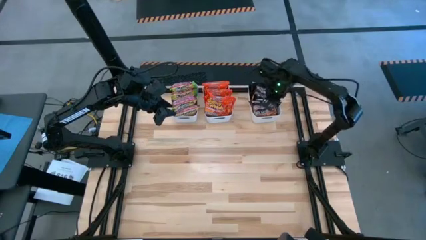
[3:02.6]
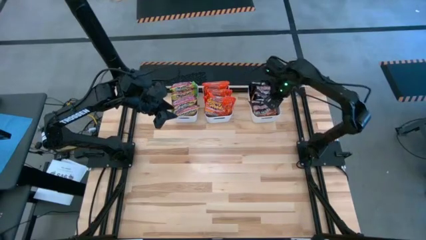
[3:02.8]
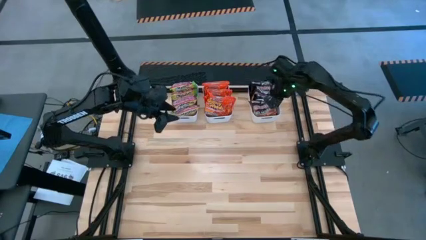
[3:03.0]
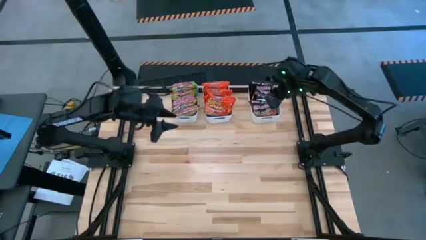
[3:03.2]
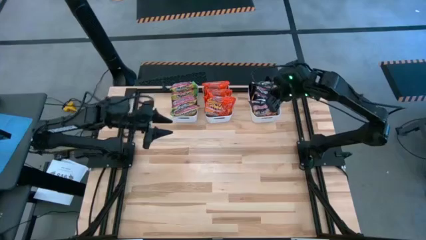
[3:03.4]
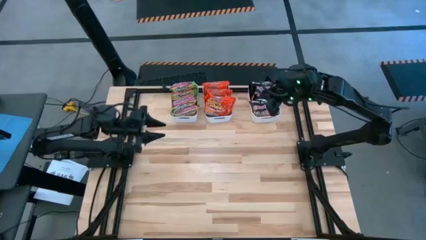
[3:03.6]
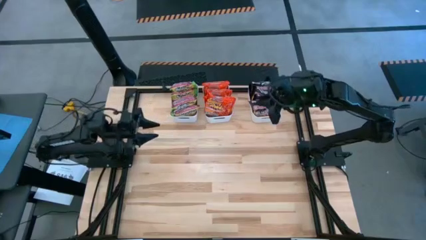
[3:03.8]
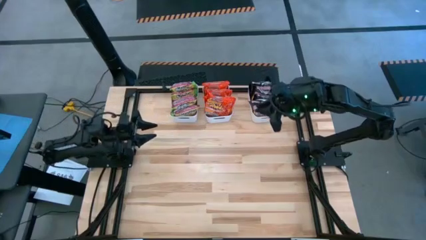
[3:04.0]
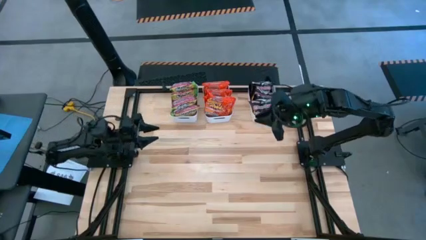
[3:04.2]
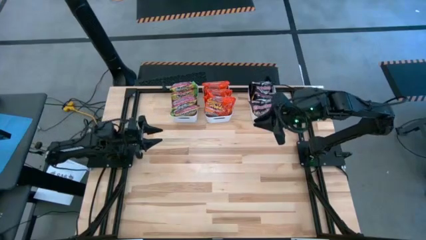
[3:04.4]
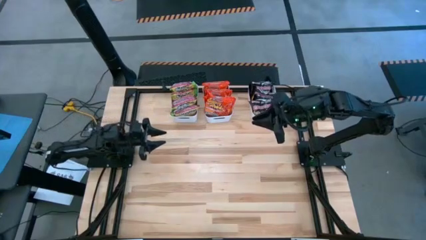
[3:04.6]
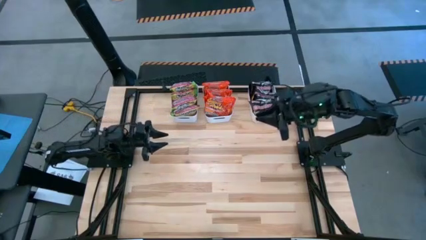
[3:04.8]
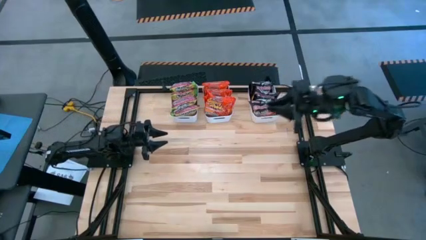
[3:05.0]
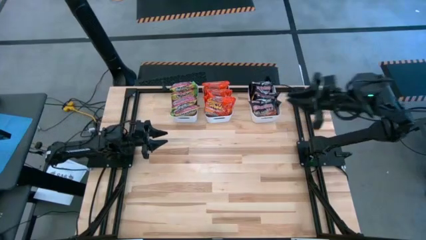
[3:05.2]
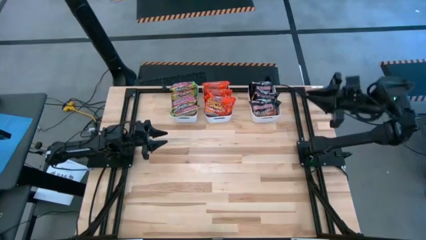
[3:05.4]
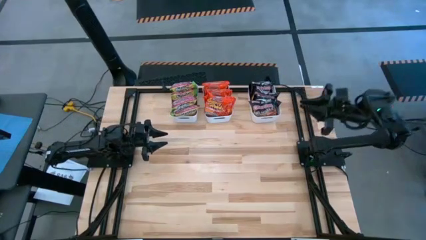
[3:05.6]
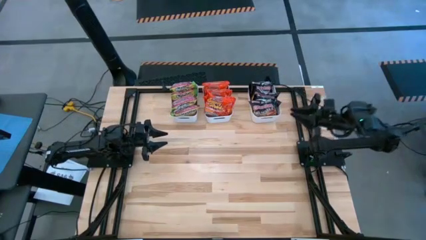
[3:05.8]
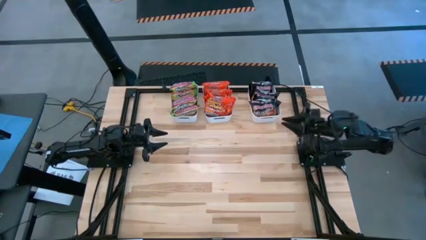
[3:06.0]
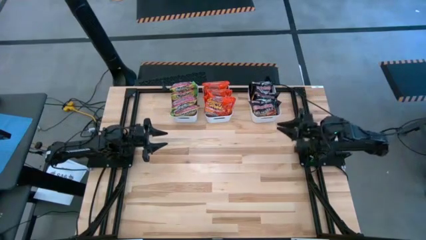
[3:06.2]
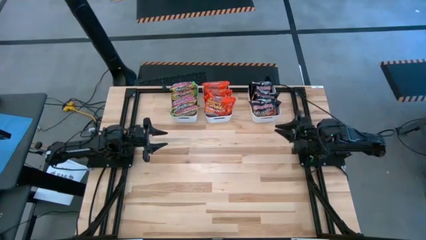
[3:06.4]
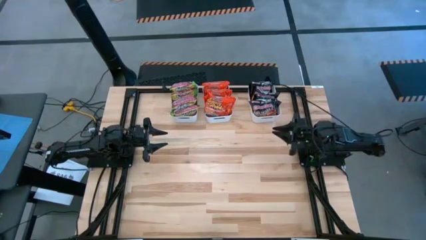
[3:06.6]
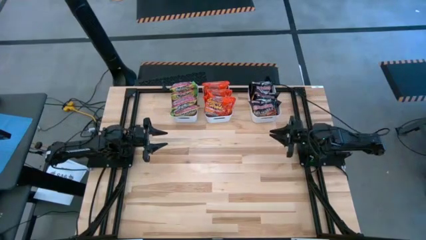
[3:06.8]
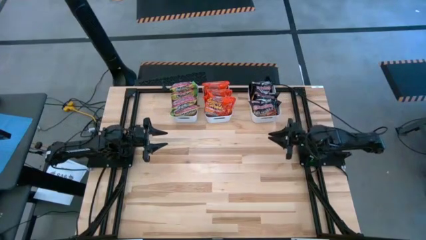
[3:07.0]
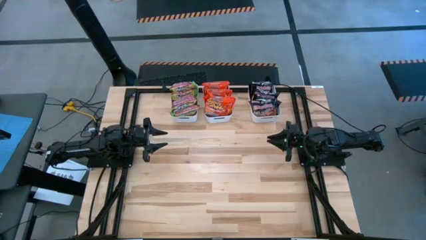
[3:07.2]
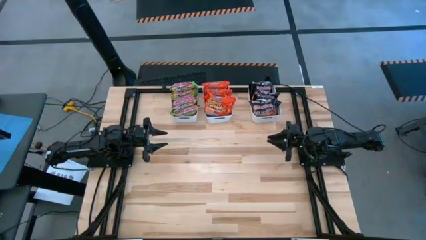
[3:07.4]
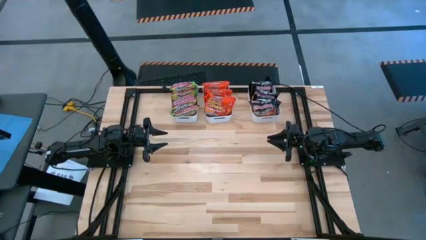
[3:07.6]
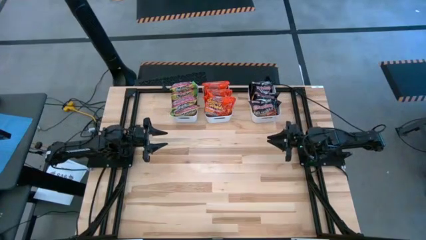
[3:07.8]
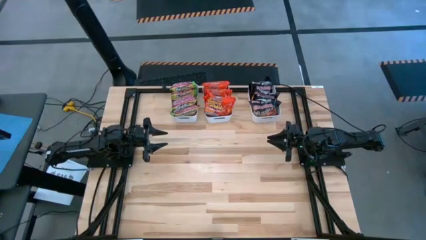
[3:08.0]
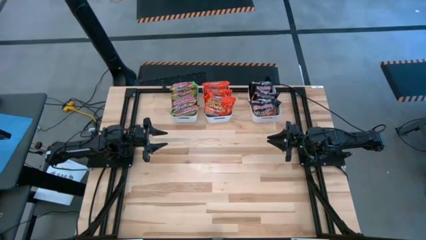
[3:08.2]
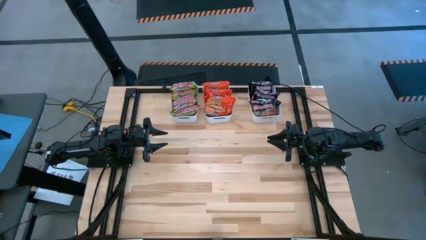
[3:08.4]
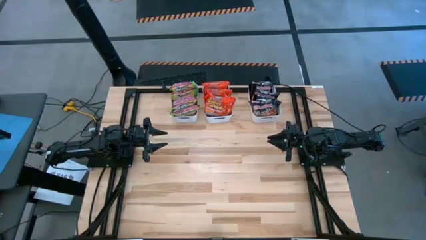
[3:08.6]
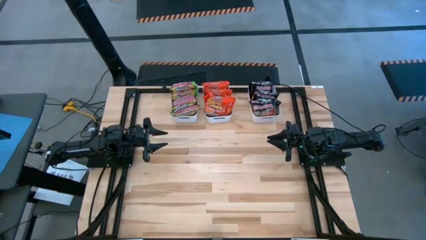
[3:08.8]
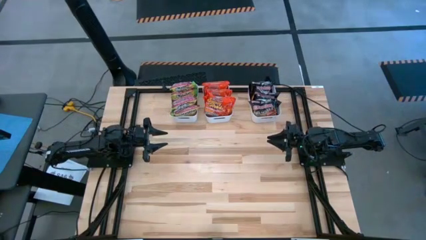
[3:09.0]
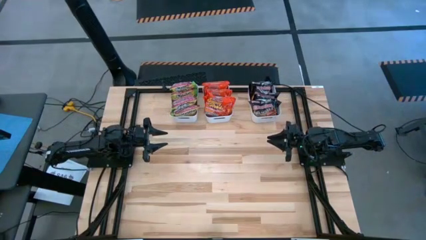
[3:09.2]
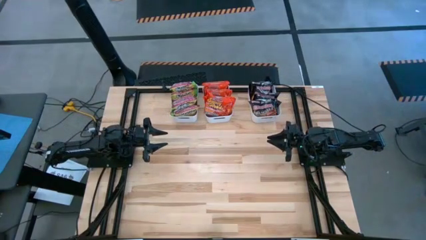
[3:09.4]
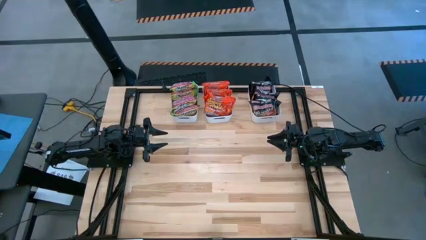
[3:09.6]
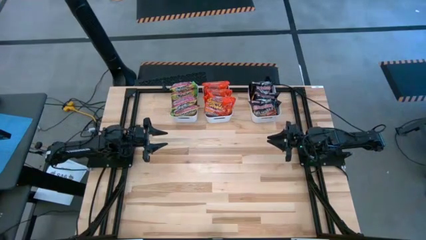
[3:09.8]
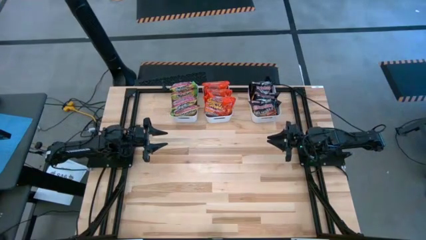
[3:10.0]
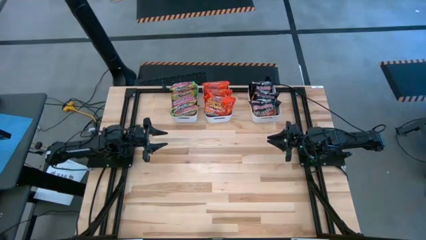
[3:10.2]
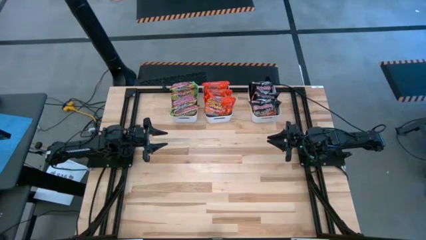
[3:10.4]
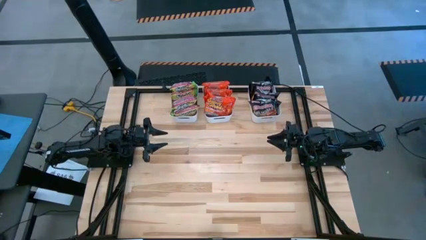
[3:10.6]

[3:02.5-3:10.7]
Task: Sort Maruchan noodles
Return to Home Position

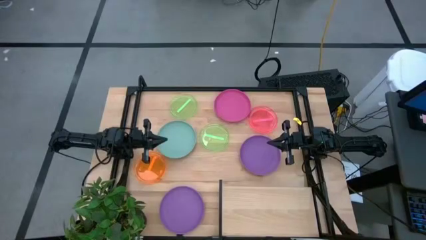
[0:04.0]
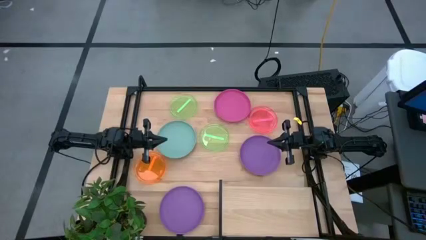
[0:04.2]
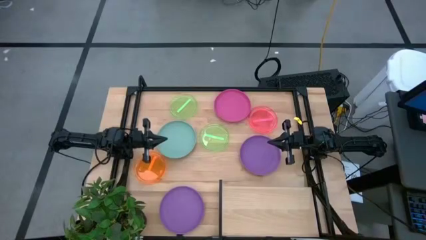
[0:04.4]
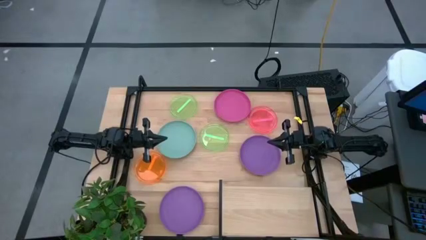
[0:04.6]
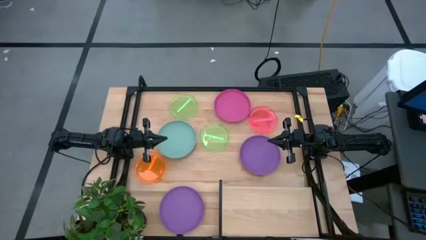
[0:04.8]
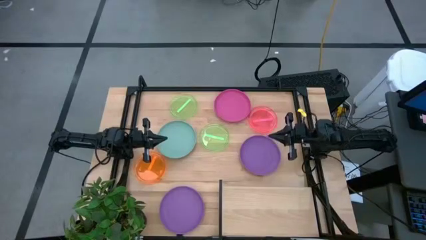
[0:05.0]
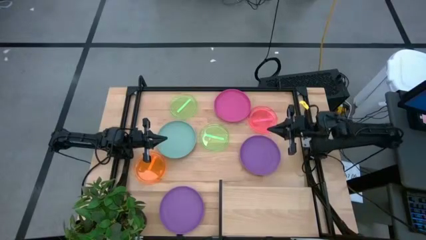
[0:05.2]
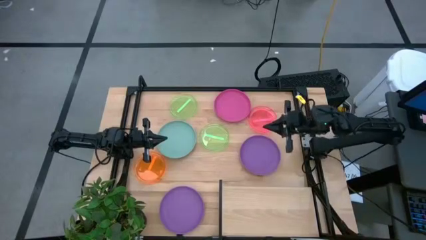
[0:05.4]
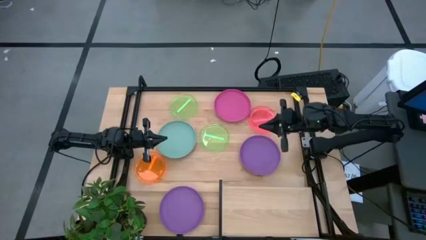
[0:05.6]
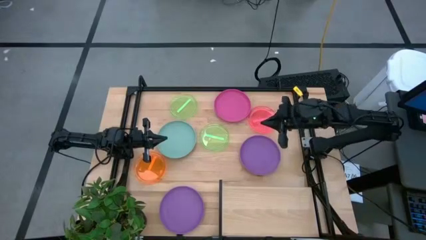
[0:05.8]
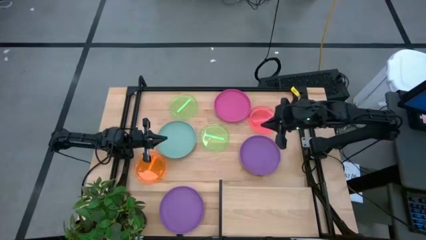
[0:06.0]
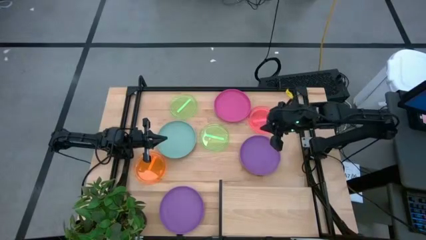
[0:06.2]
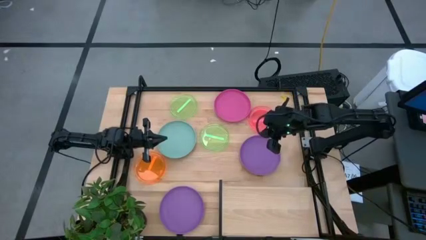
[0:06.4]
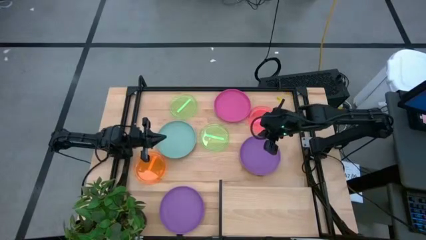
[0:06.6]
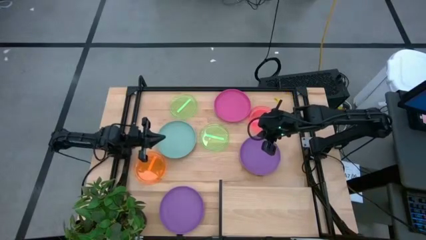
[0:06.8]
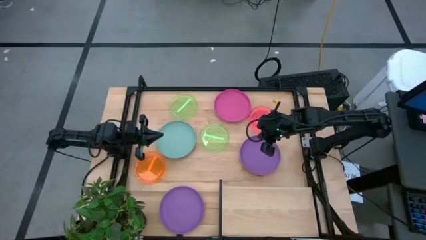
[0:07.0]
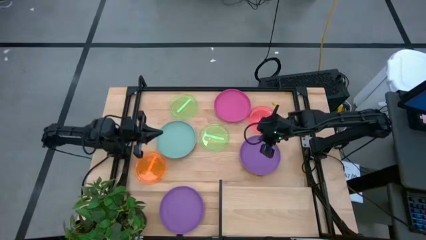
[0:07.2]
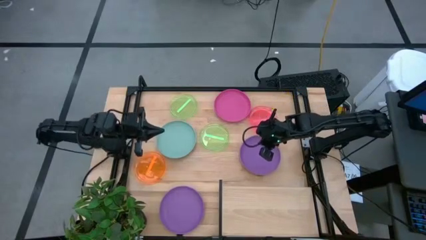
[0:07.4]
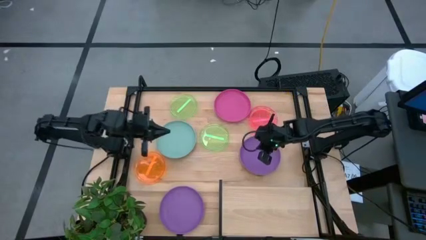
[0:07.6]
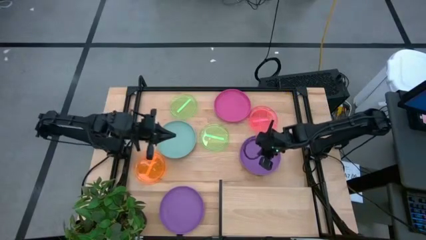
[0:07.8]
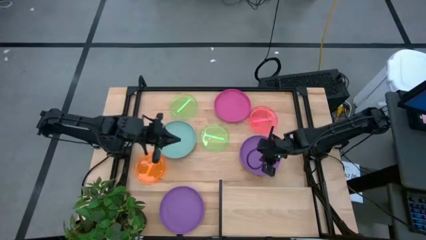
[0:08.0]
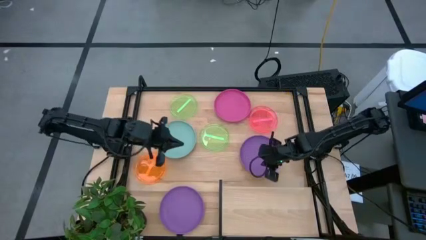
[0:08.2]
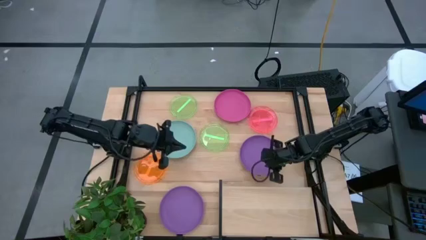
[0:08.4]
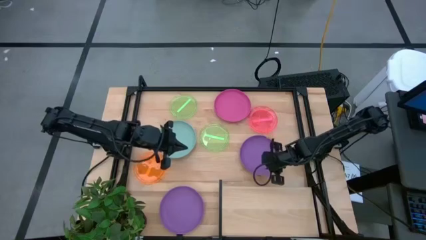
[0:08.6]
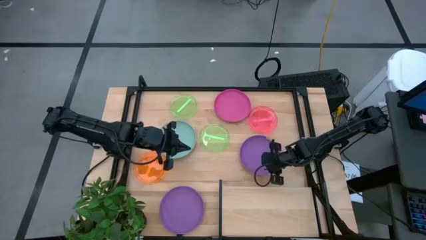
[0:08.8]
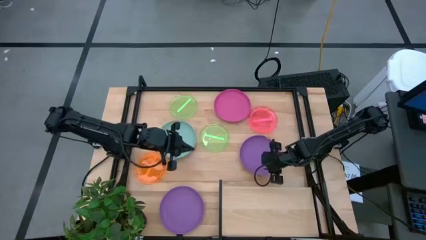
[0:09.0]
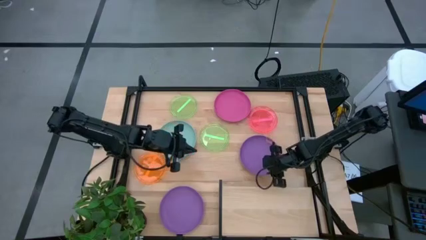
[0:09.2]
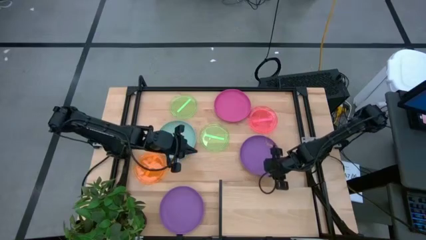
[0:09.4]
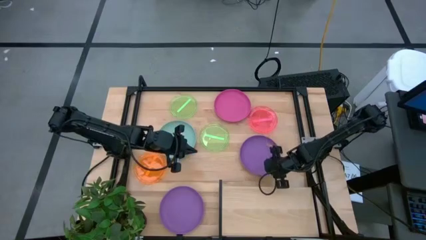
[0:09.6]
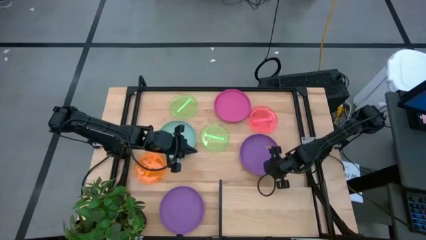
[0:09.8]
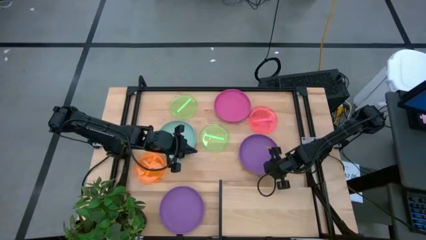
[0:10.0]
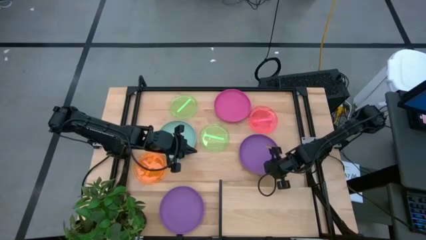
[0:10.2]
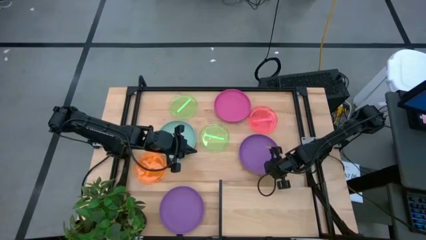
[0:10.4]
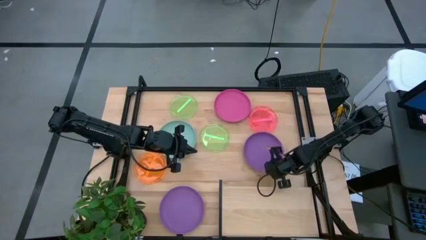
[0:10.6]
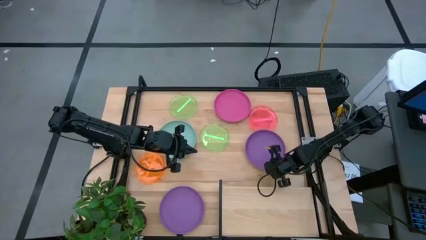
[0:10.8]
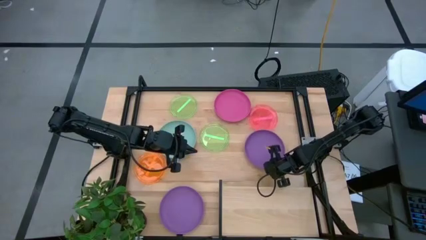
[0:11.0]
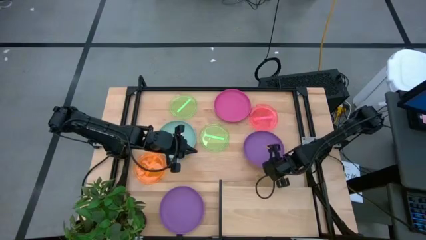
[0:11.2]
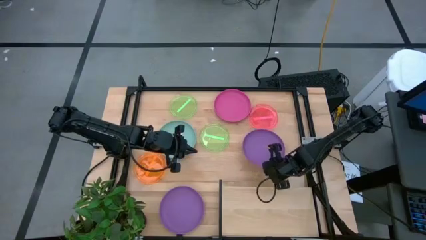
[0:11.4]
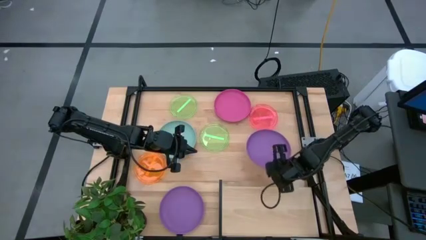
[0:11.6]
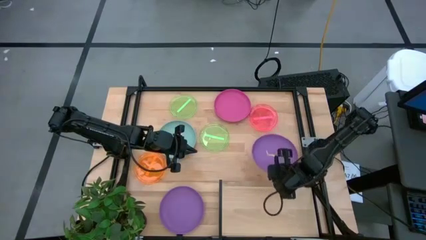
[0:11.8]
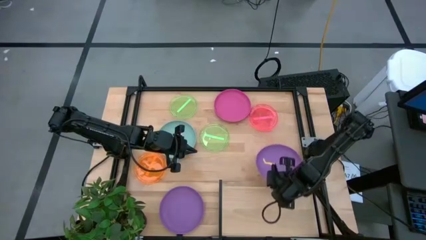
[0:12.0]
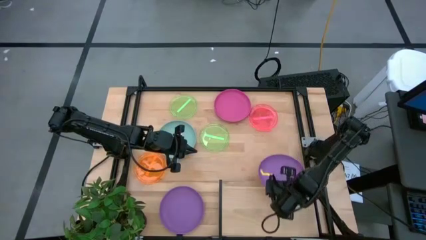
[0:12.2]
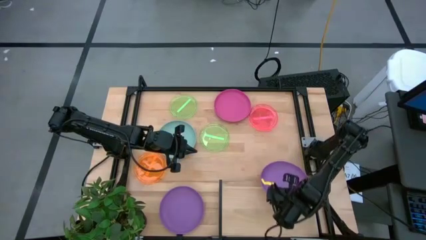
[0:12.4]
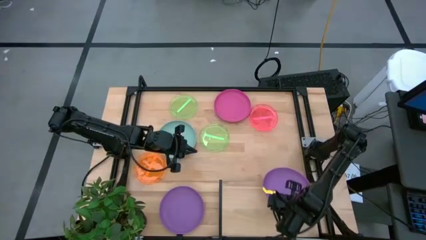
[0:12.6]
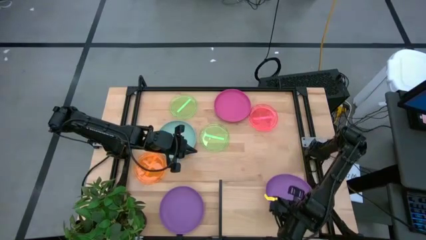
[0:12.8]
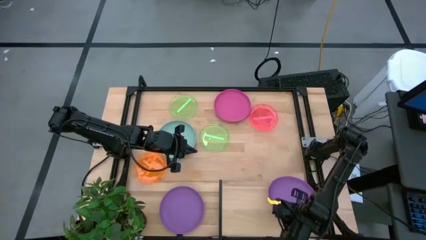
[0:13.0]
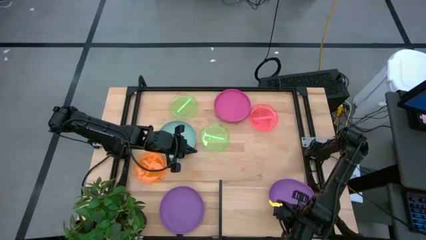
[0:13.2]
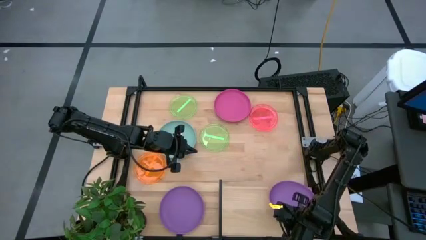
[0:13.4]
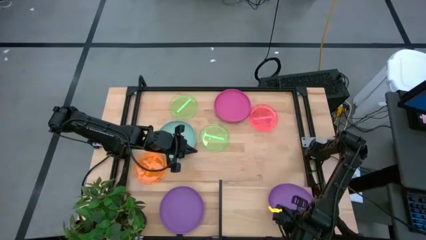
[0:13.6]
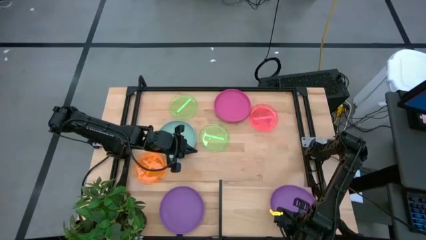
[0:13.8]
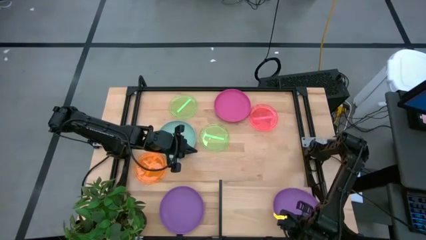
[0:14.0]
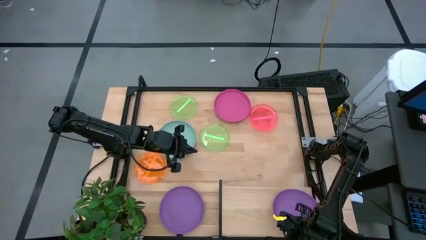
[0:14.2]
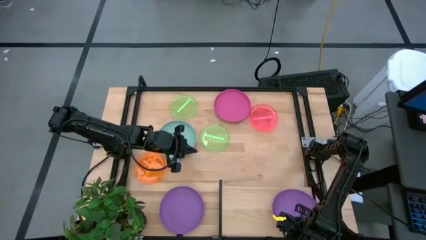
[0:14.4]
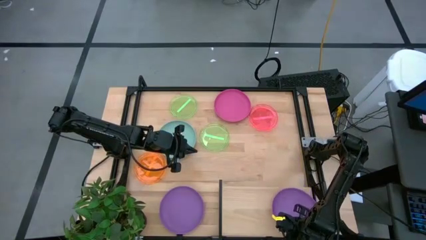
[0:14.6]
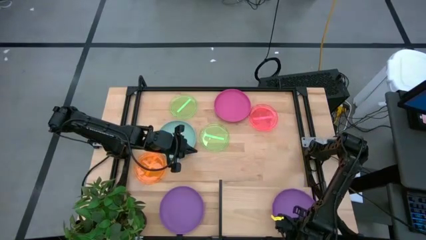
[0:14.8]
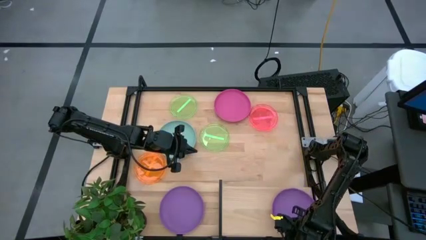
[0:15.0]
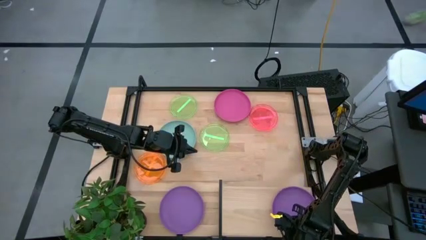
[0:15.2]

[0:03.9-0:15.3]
Task: Place and stack plates onto a shelf
Put the right purple plate on the shelf
